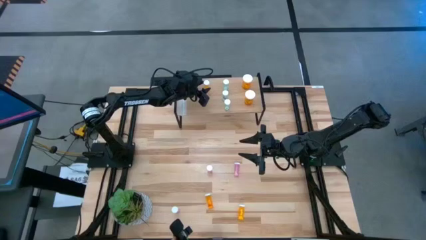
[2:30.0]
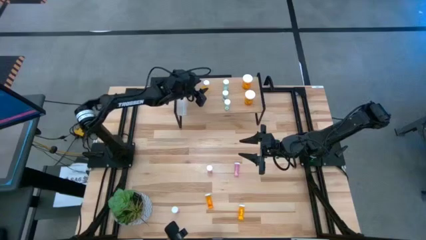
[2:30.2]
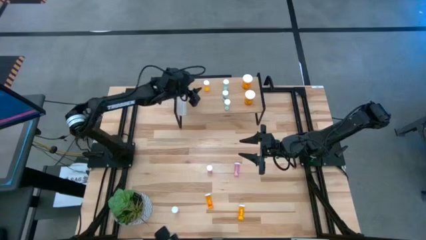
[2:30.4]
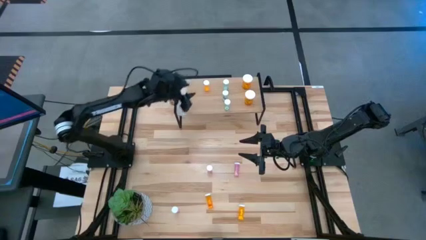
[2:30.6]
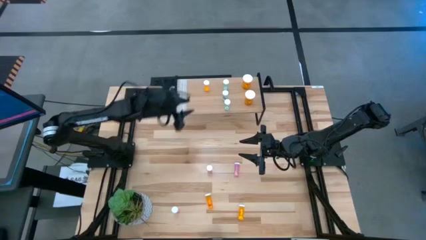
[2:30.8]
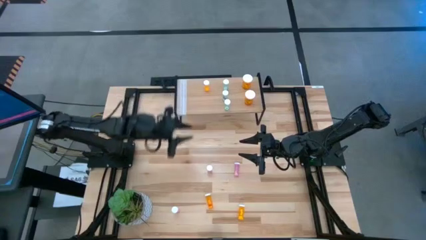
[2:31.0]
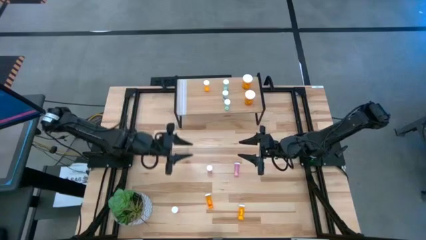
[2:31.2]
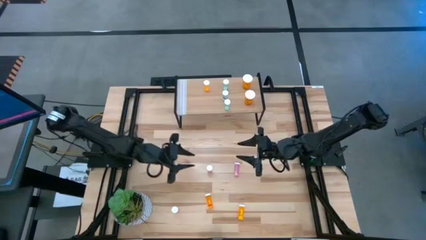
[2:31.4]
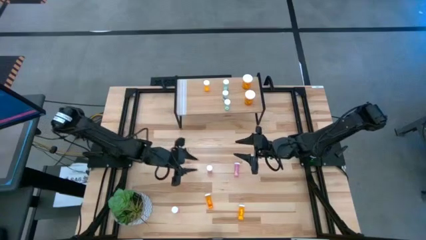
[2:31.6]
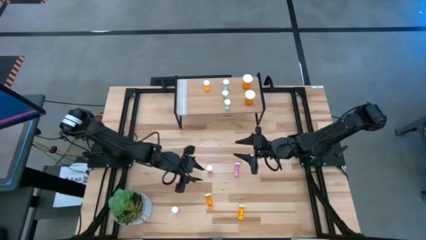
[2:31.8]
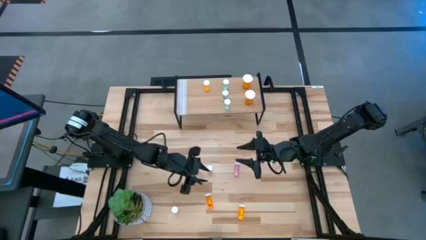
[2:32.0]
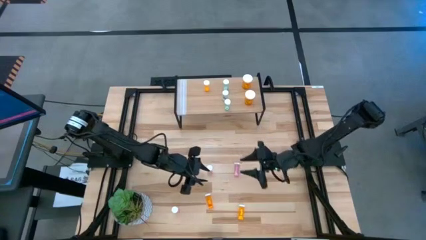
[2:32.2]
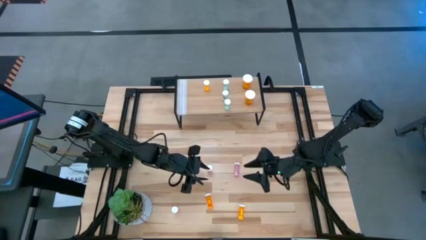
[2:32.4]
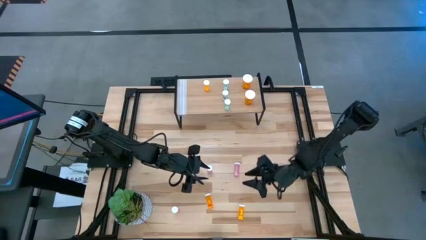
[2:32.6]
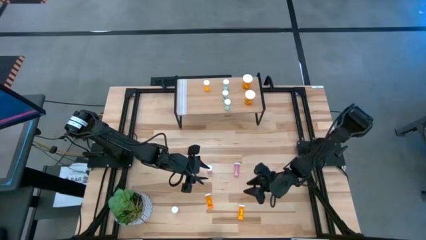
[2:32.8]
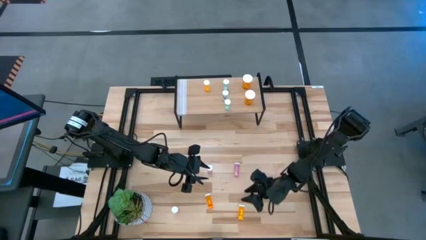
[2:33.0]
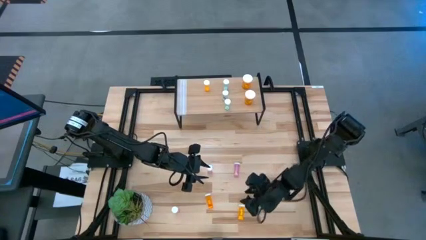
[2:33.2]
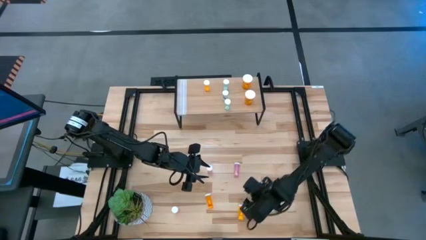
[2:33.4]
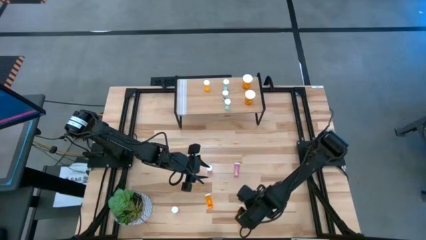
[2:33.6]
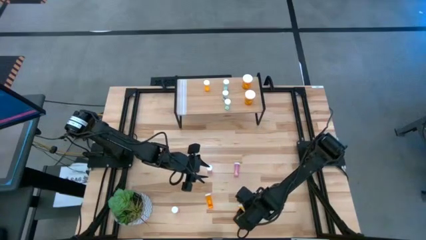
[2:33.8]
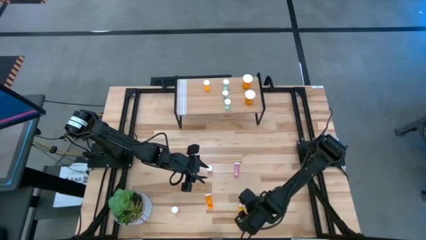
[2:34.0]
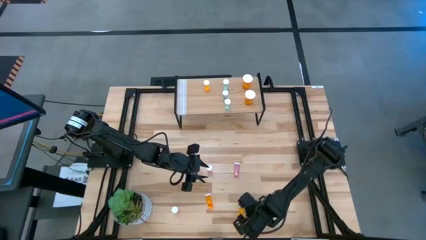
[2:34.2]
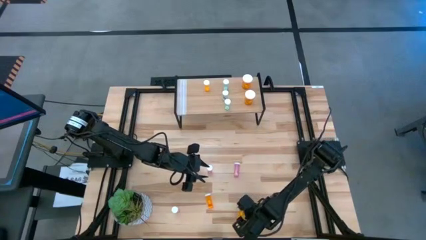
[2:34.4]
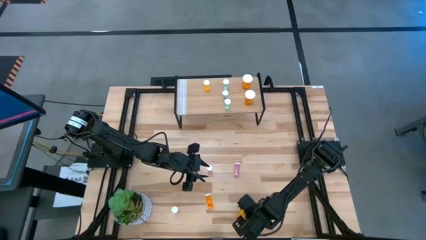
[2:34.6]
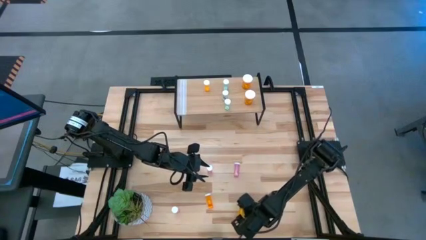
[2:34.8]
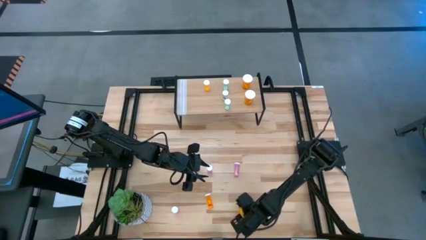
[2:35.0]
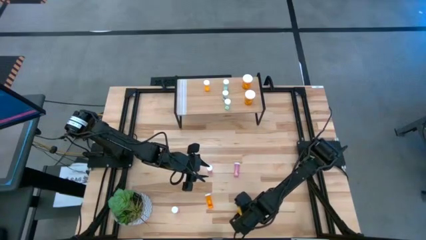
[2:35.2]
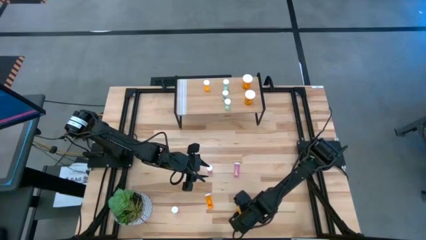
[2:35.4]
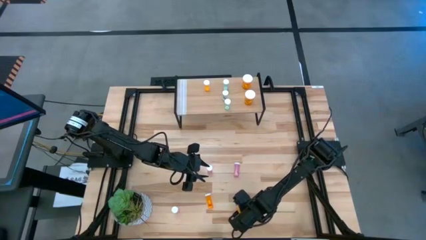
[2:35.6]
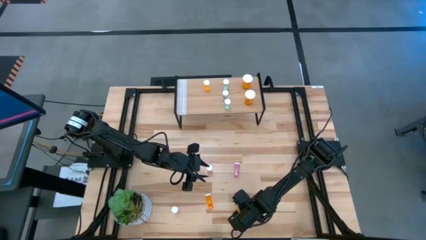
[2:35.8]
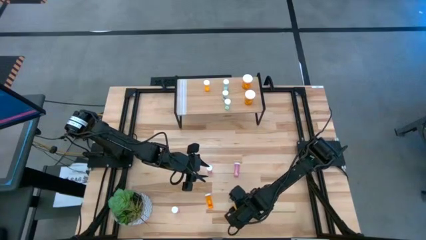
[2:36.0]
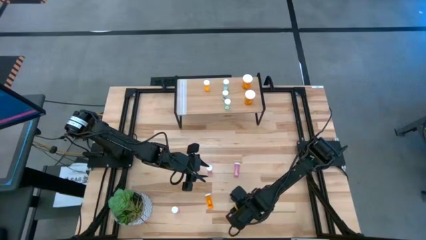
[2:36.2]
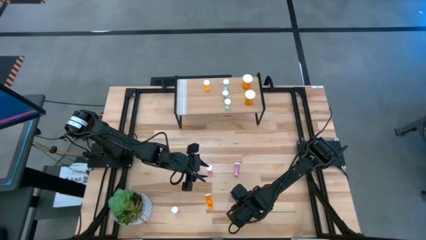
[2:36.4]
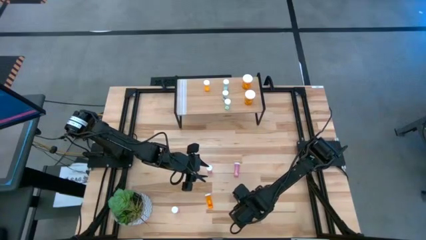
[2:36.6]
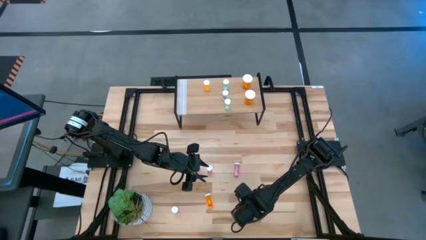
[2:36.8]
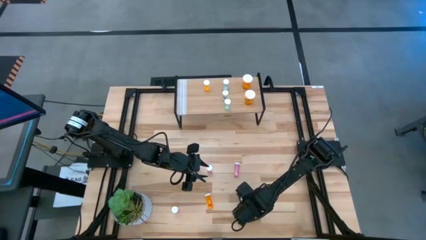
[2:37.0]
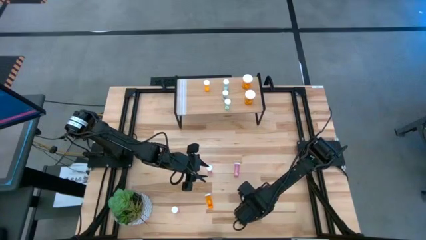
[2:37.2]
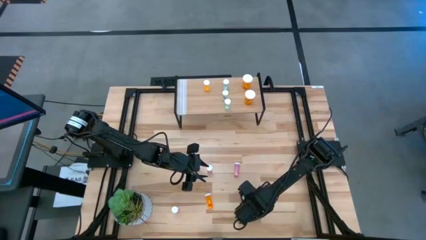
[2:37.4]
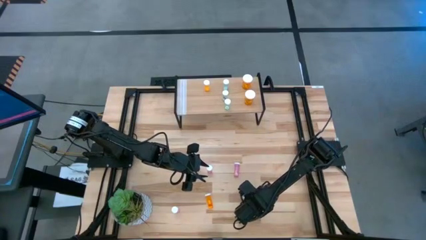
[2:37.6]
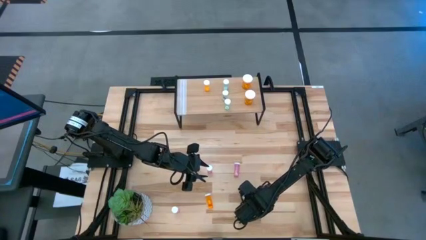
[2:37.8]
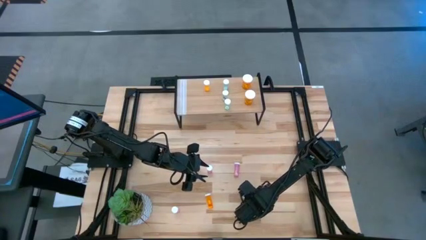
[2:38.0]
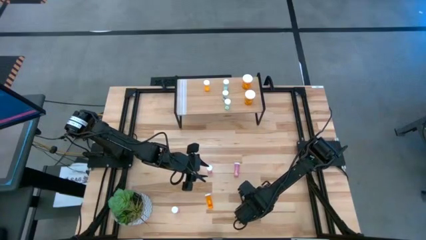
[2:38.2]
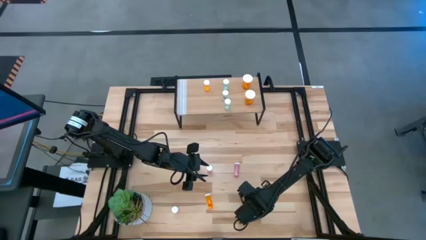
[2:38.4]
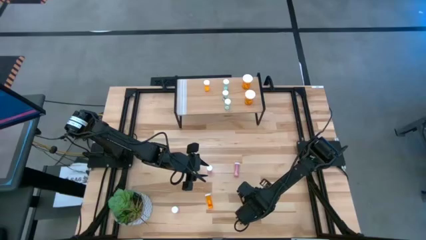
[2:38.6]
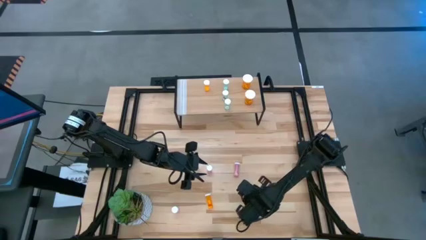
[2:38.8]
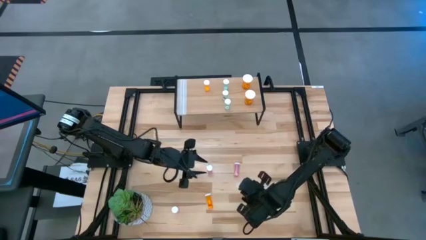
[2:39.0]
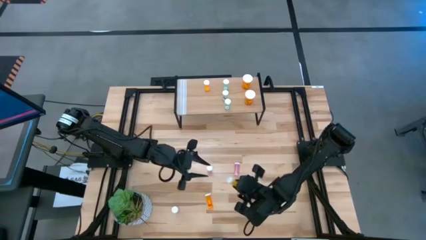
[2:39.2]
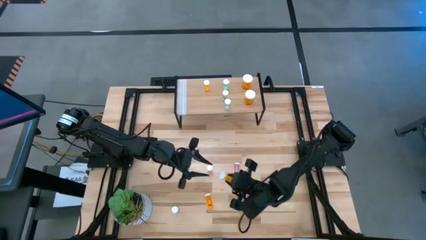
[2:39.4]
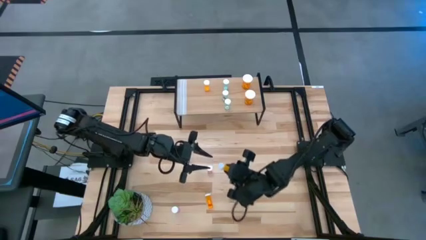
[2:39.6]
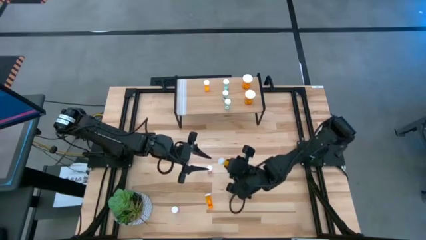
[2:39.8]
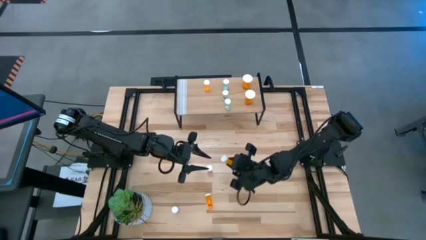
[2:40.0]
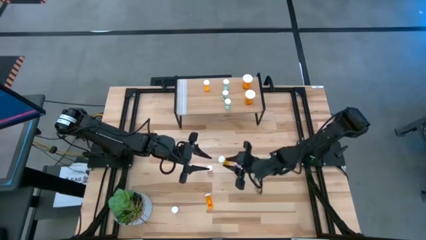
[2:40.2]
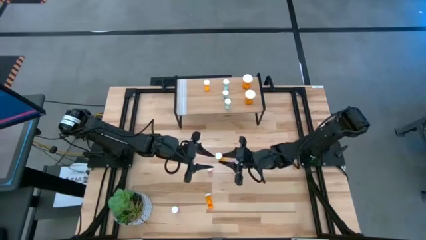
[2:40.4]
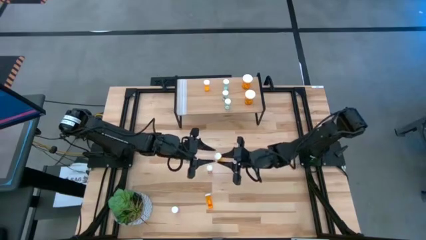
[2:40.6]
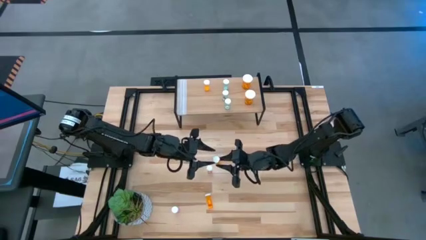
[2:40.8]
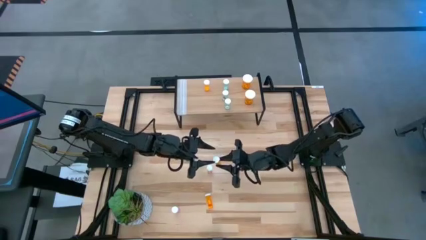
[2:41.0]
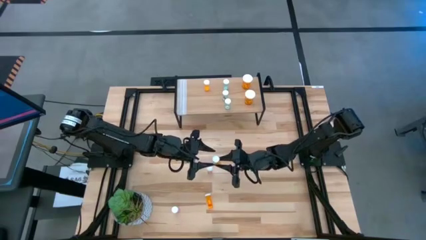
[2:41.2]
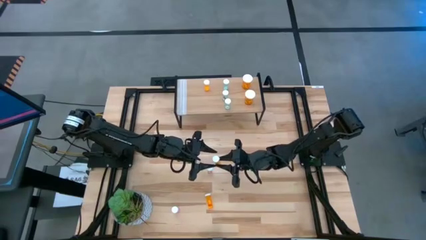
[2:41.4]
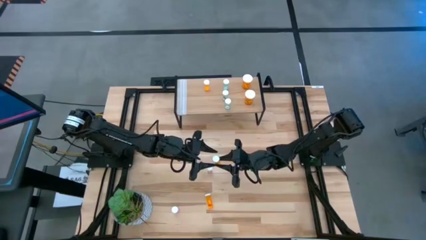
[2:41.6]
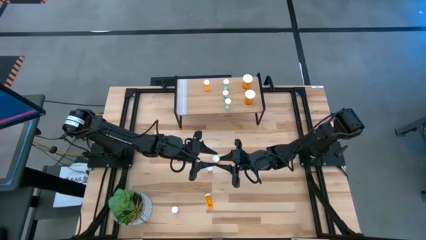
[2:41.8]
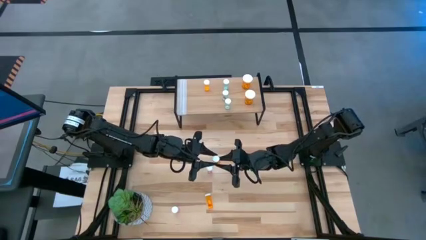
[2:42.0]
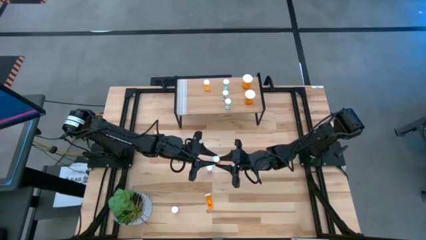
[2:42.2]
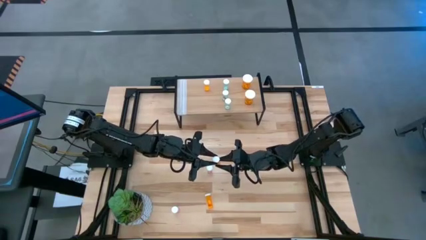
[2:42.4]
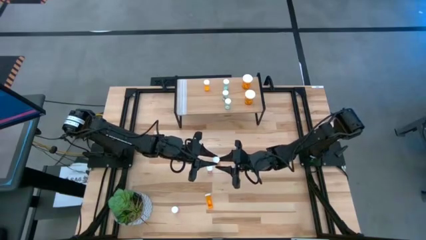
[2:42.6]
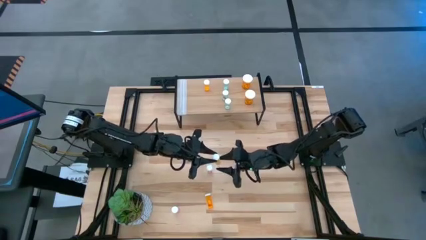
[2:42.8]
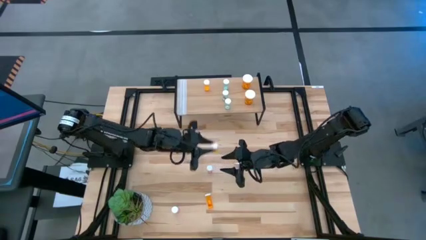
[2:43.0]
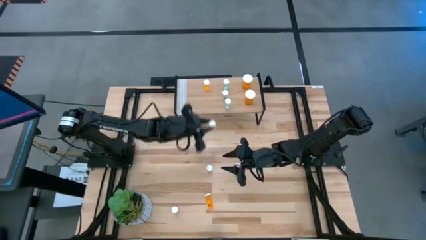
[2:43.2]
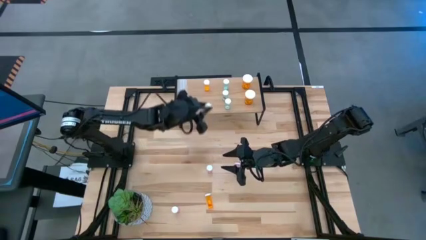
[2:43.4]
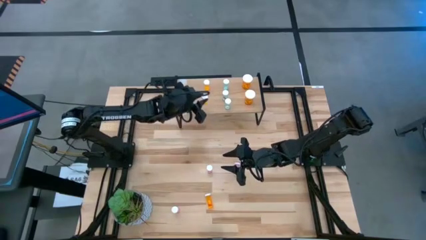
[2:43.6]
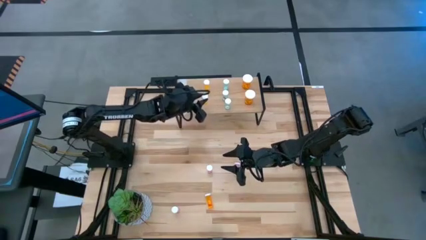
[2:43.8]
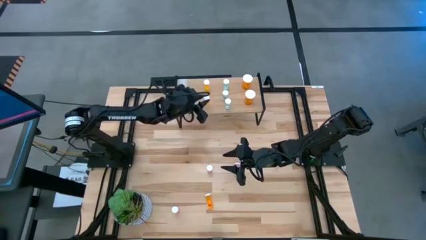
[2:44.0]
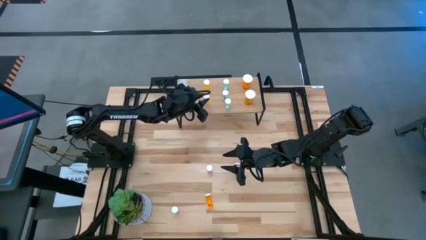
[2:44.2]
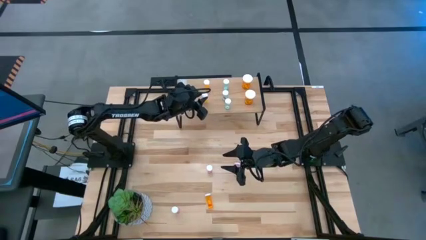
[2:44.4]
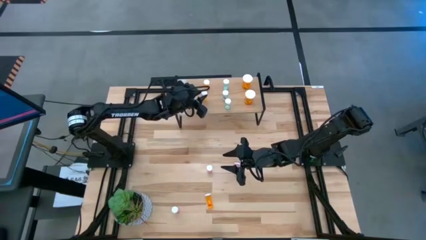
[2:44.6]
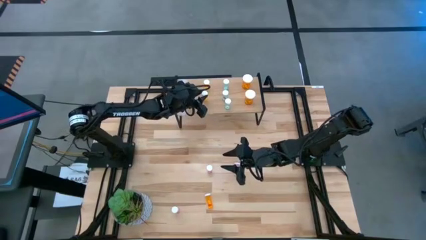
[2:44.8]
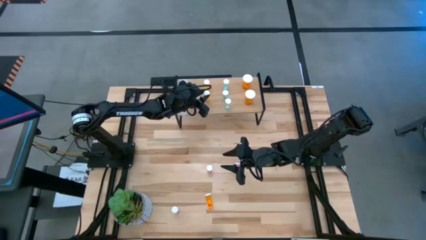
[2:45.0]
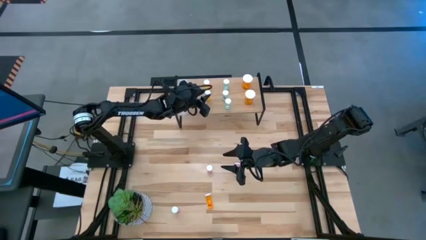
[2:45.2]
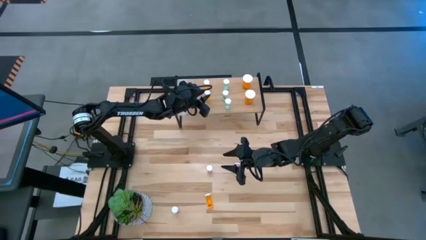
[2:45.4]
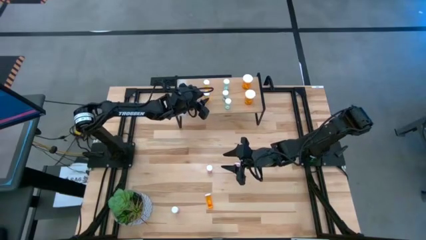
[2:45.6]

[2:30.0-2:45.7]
Task: Pick and place medicine bottles onto shelf by color
Put the right small orange pill bottle on the shelf aligned with the other small orange pill bottle

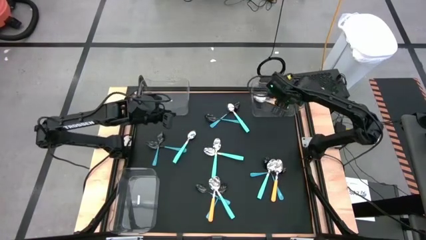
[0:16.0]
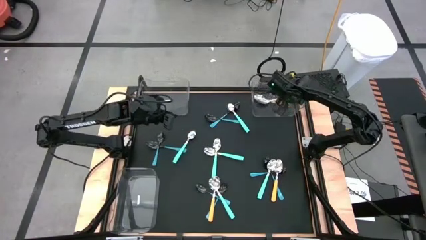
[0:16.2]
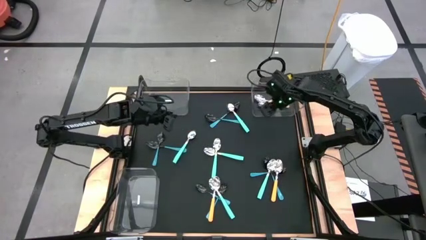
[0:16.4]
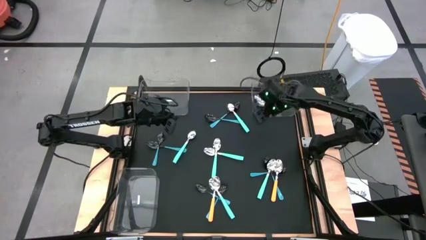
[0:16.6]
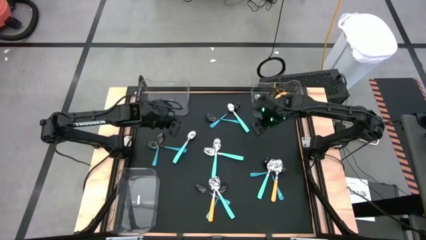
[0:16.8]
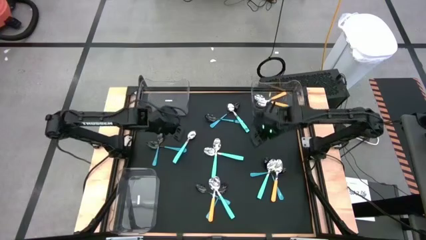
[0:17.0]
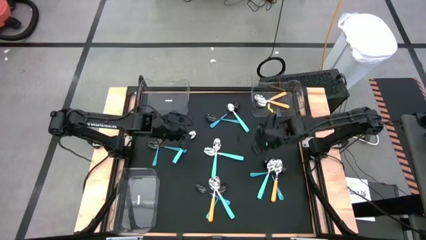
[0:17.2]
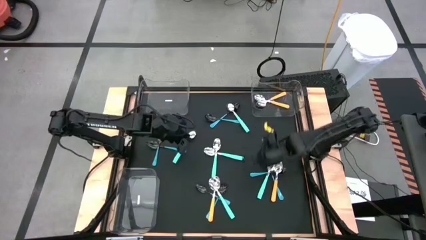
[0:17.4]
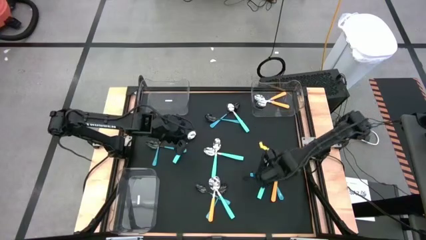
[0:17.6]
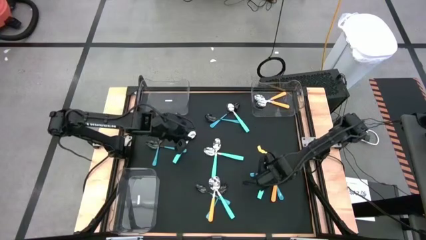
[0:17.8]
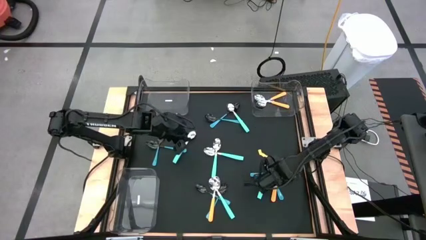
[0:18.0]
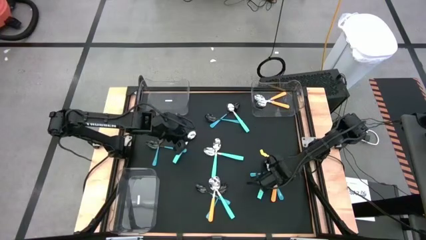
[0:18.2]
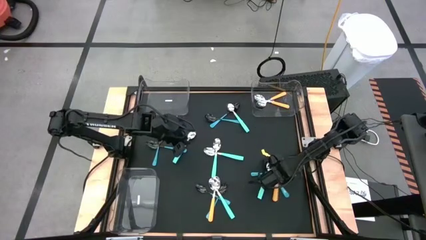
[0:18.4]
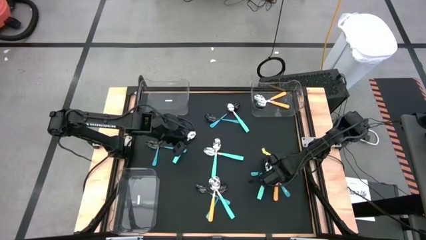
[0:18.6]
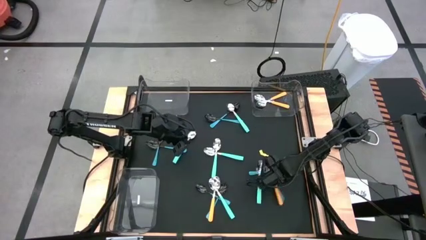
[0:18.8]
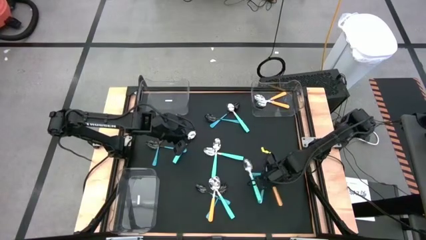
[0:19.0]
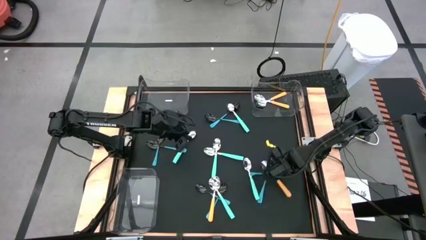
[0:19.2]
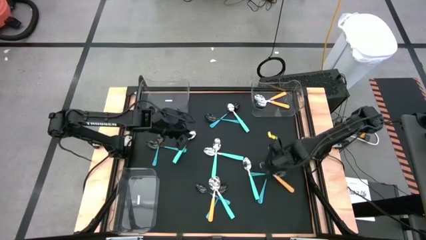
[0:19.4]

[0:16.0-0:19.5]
Task: Sort silverware by color (type)
Put the yellow spoon into the top right transparent bin
